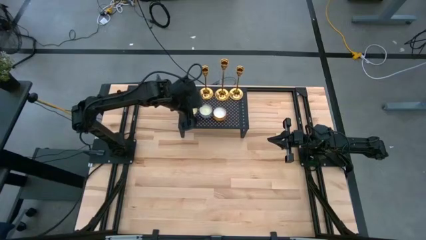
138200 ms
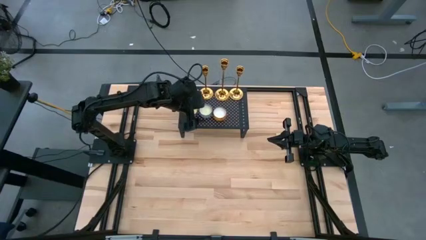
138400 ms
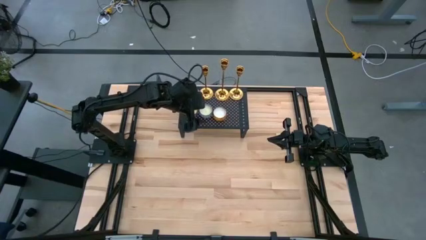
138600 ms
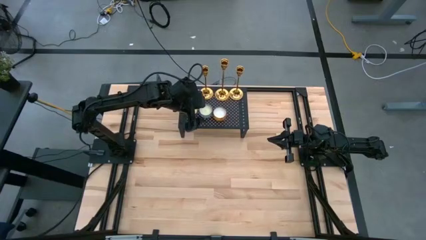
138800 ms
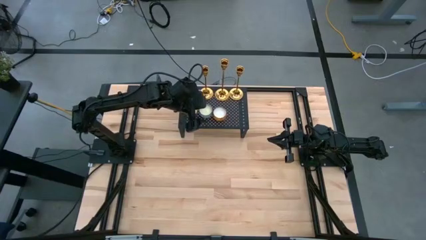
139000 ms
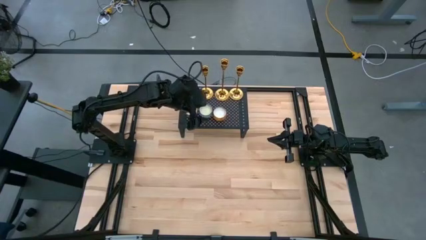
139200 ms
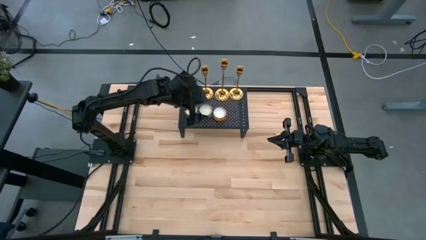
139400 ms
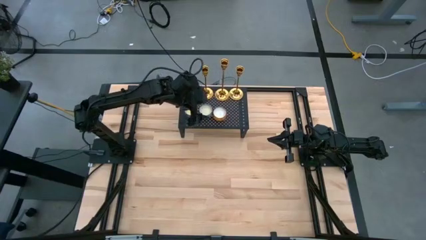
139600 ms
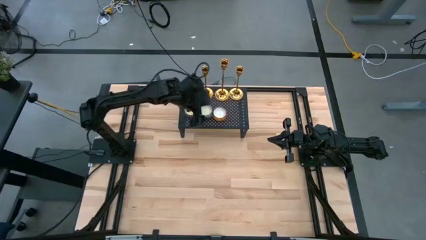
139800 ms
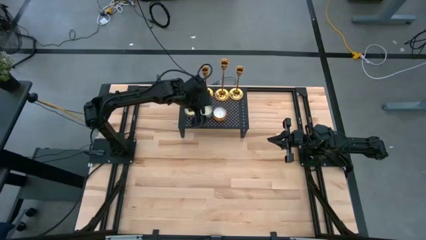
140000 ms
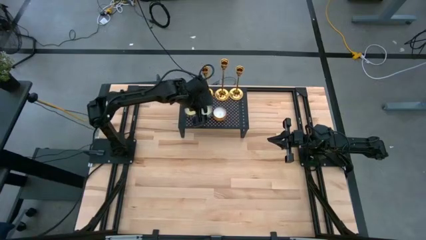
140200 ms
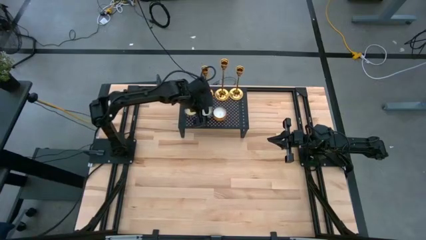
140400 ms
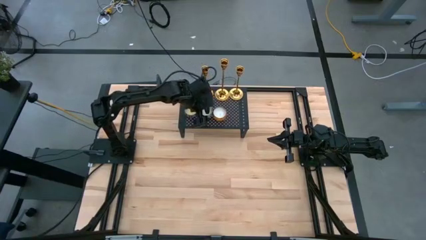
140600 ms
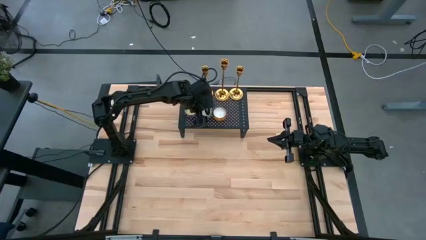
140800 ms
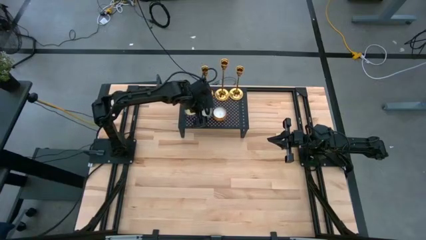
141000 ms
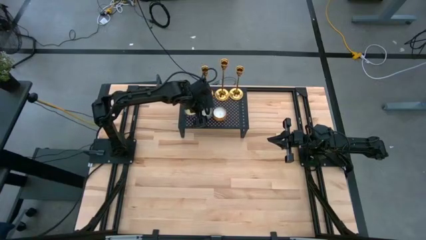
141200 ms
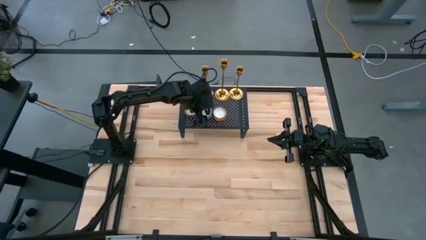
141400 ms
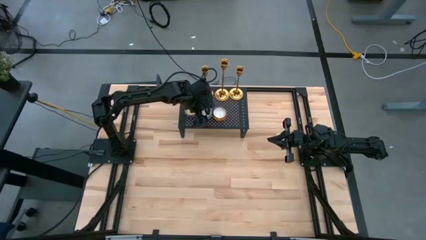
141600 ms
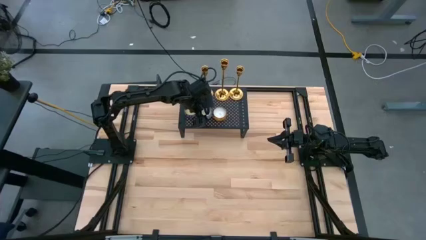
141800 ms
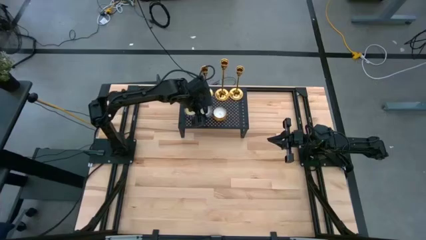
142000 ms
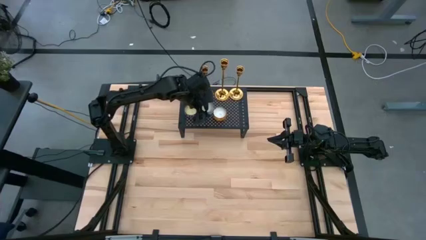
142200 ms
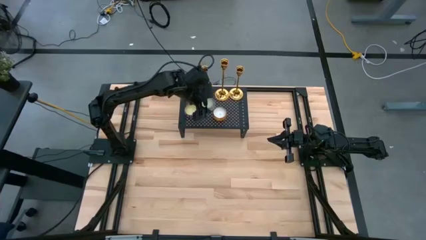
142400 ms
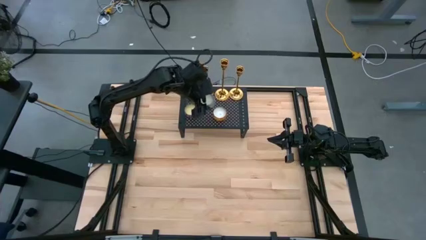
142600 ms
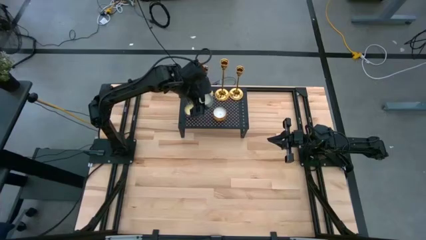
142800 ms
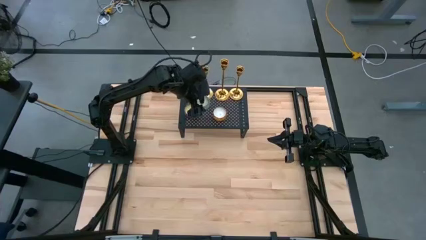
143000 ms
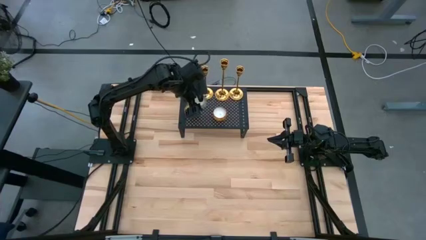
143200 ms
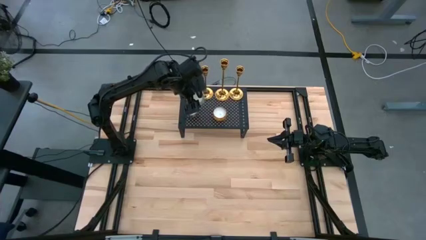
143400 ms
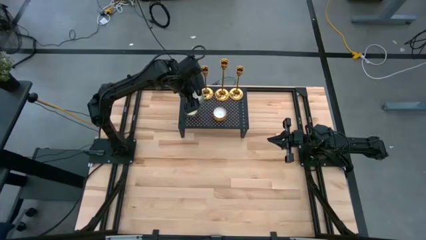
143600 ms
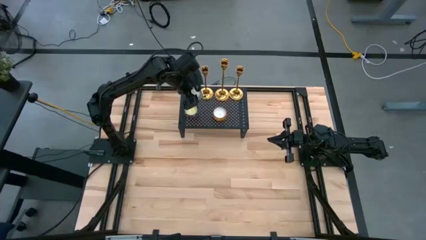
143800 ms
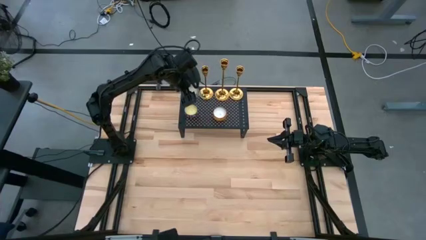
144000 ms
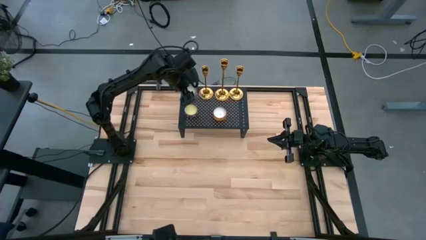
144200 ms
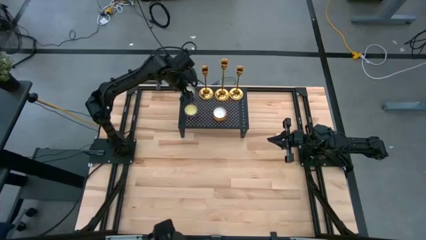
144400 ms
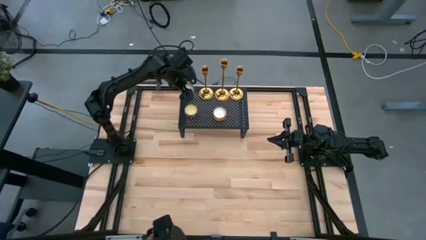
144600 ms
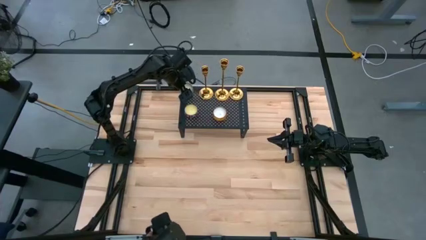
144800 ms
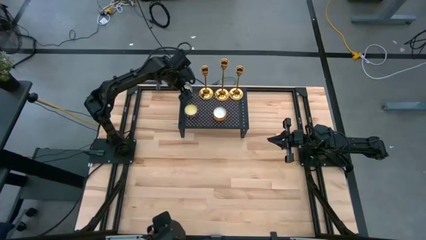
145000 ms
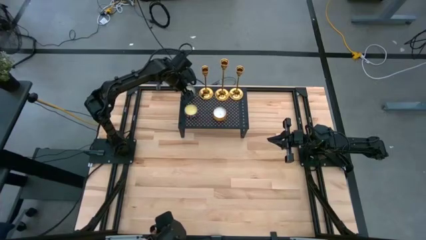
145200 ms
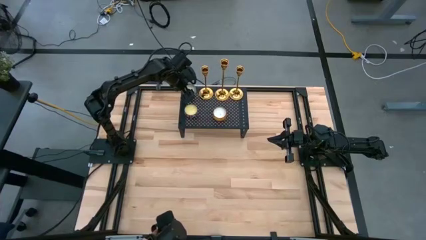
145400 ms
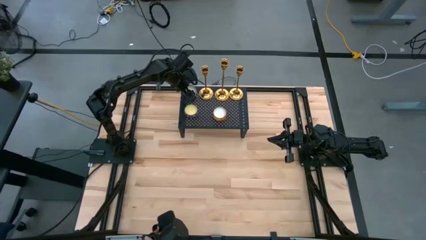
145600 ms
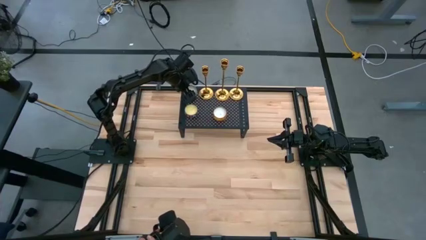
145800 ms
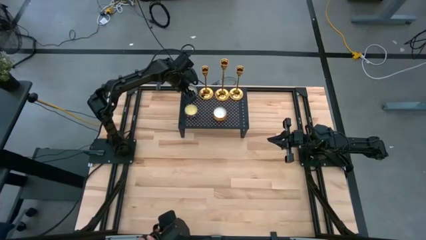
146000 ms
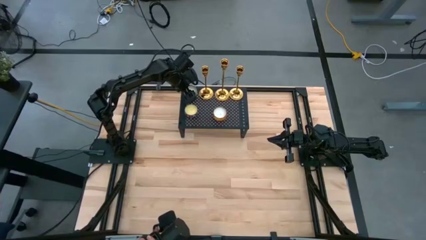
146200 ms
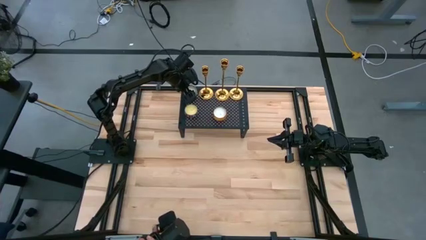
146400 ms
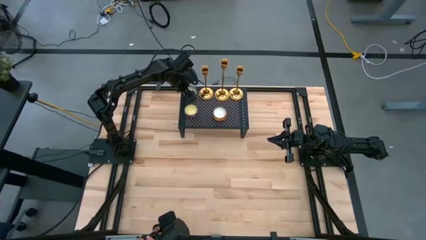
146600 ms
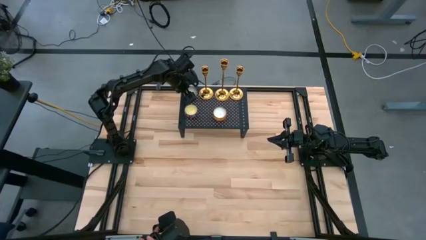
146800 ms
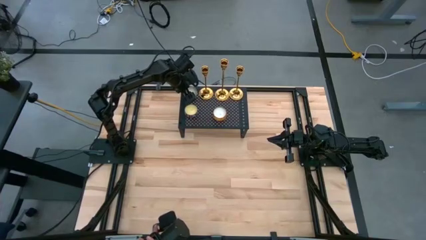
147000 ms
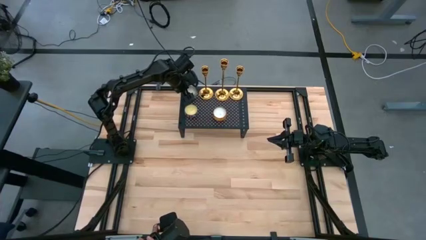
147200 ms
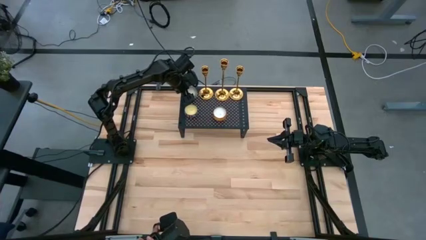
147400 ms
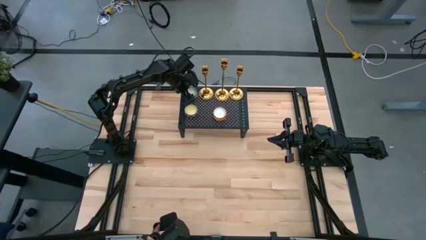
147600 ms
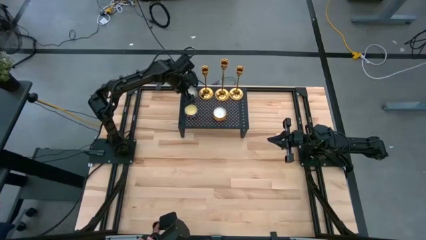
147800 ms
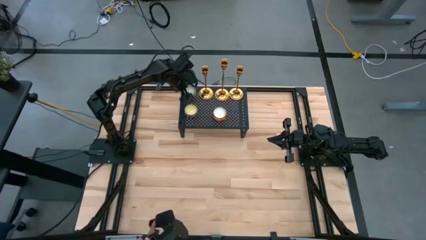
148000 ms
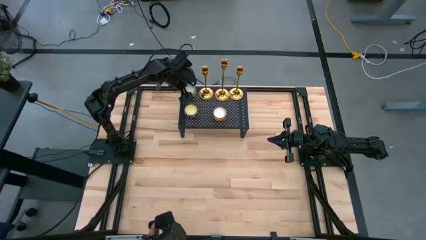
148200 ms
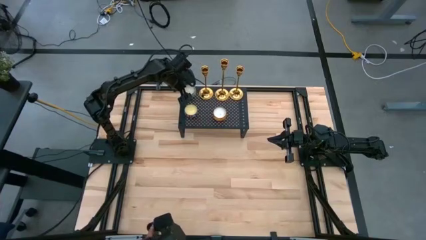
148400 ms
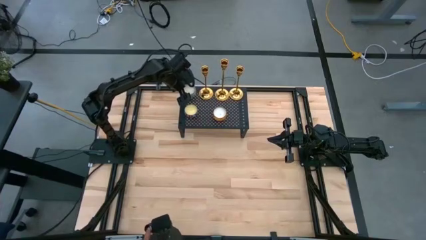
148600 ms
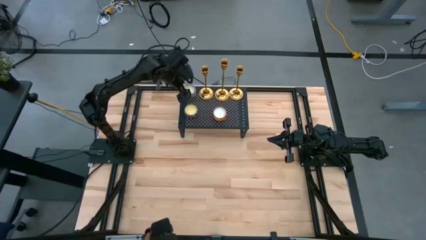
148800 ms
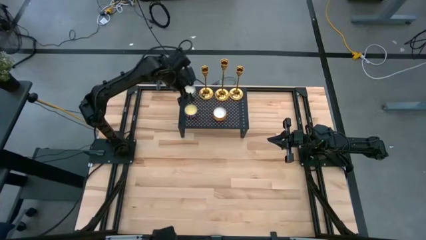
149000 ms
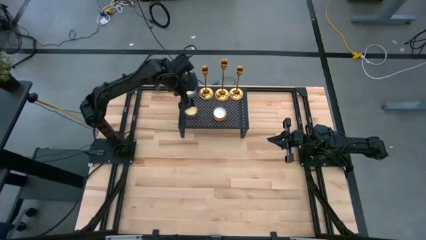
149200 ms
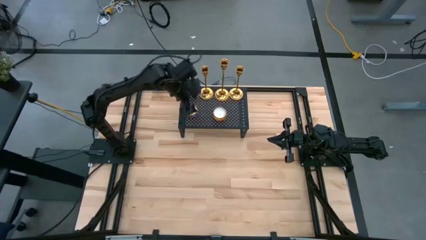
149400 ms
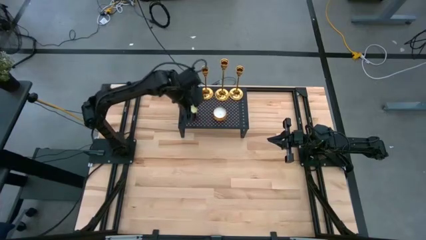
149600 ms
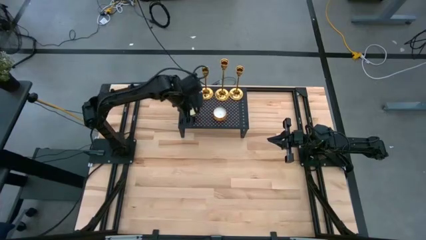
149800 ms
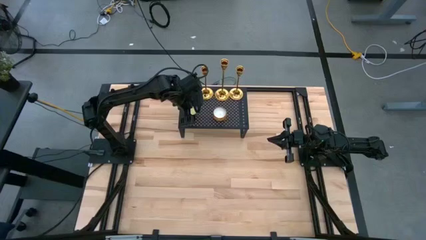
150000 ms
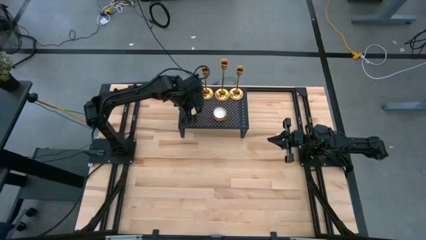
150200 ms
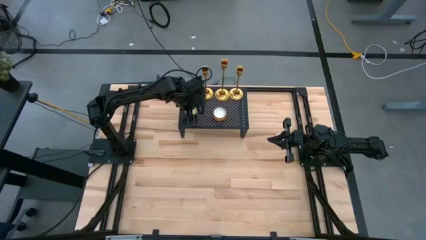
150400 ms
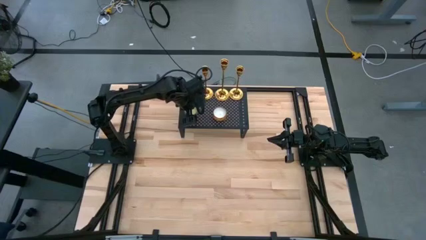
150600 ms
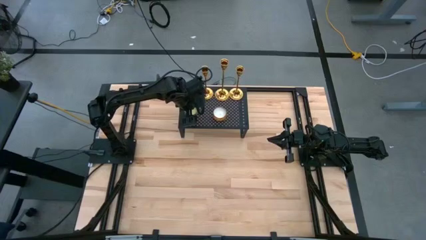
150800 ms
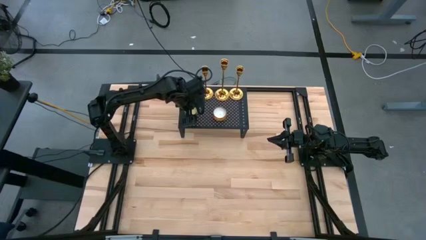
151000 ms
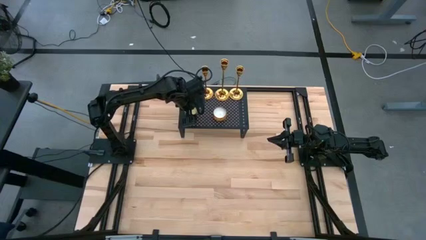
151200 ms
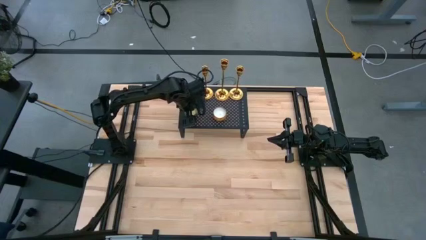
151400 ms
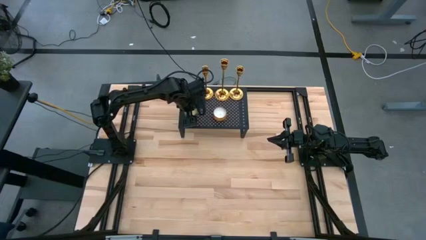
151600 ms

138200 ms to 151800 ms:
Task: Pick & Place candle stick holders
Adjust the scented candles on the shelf
